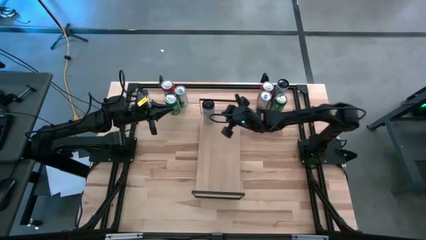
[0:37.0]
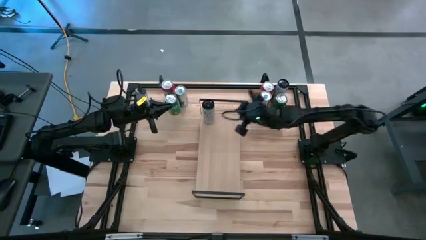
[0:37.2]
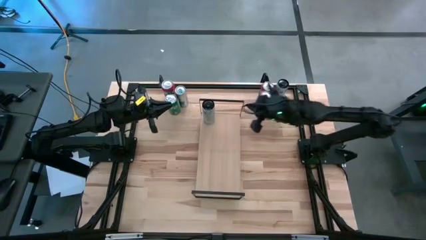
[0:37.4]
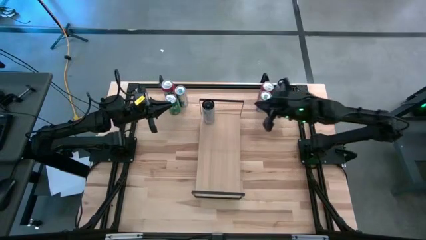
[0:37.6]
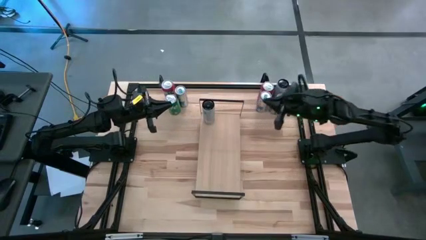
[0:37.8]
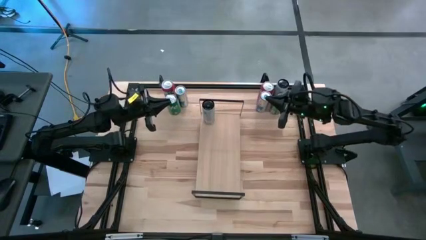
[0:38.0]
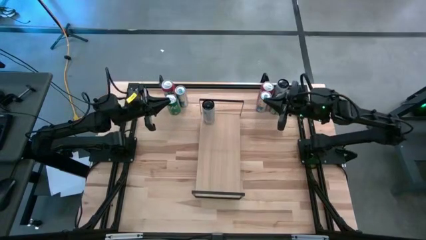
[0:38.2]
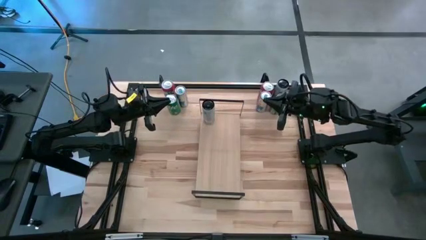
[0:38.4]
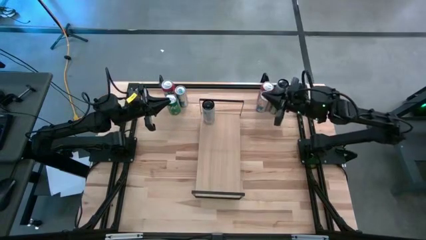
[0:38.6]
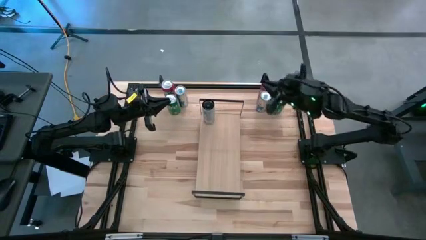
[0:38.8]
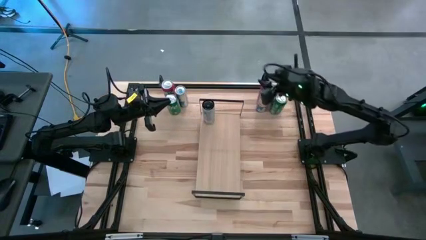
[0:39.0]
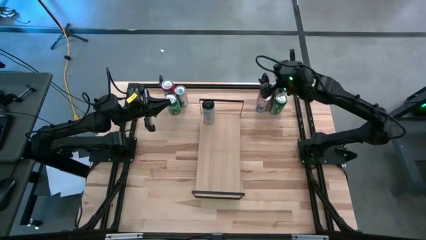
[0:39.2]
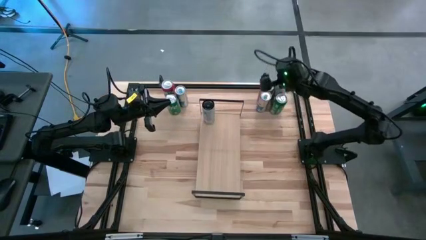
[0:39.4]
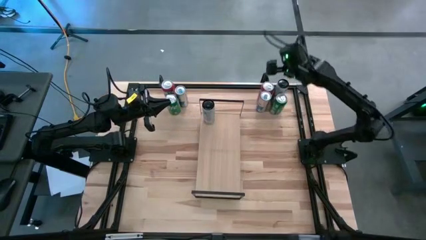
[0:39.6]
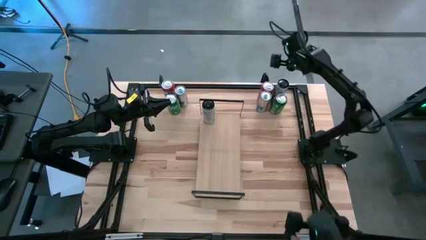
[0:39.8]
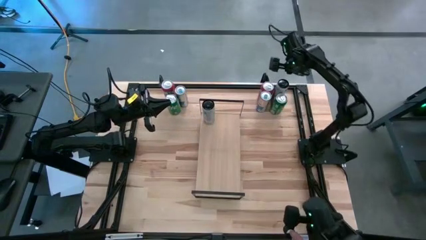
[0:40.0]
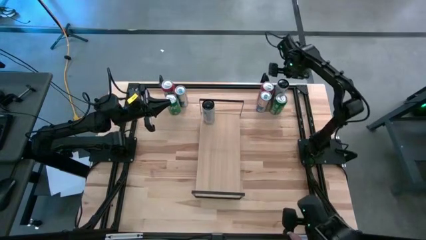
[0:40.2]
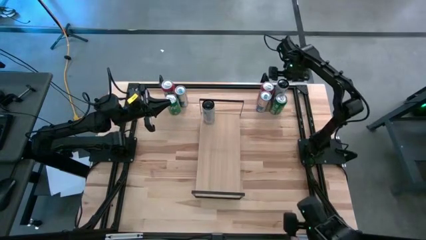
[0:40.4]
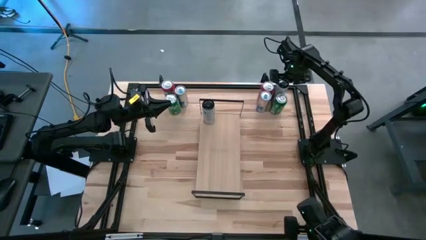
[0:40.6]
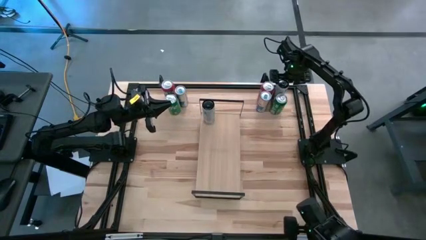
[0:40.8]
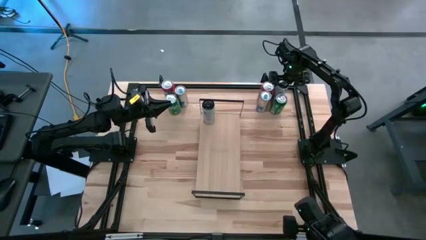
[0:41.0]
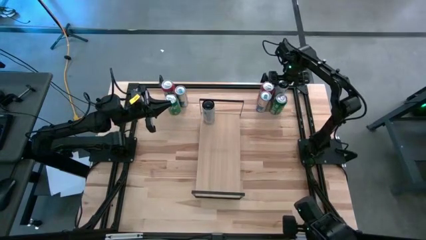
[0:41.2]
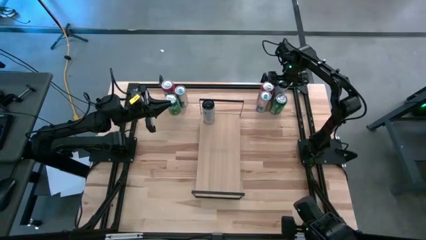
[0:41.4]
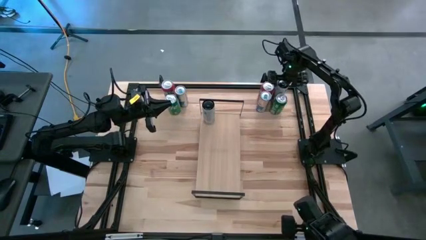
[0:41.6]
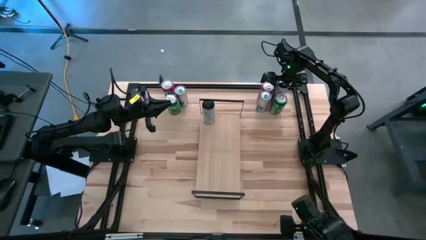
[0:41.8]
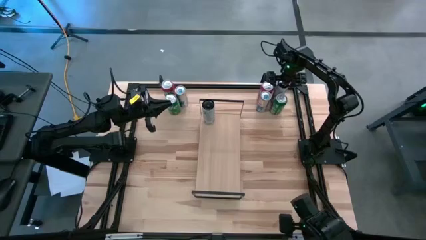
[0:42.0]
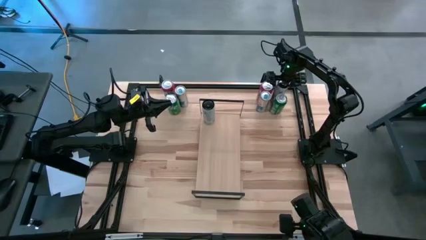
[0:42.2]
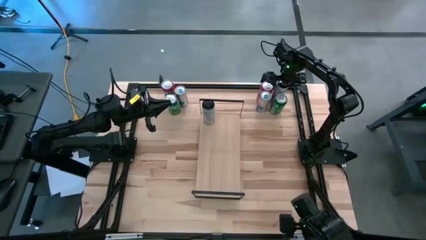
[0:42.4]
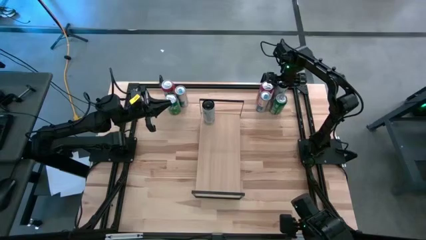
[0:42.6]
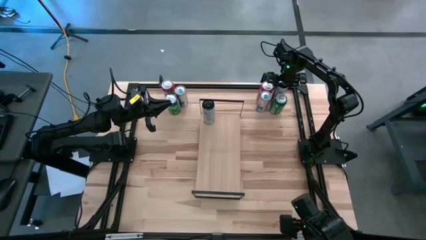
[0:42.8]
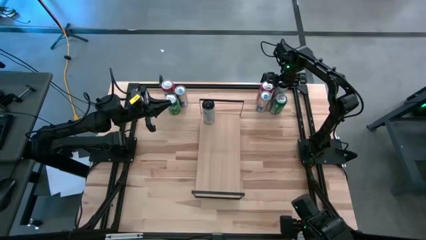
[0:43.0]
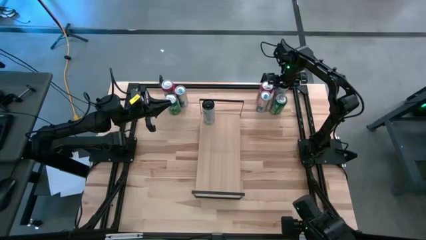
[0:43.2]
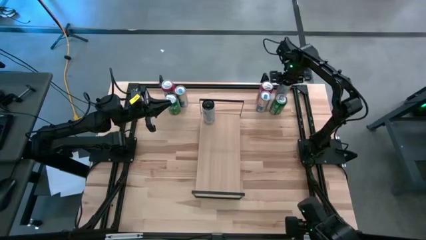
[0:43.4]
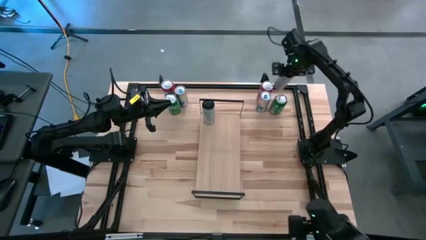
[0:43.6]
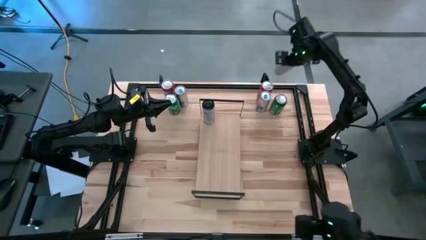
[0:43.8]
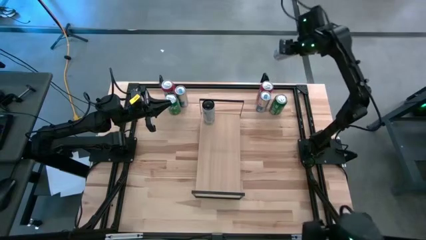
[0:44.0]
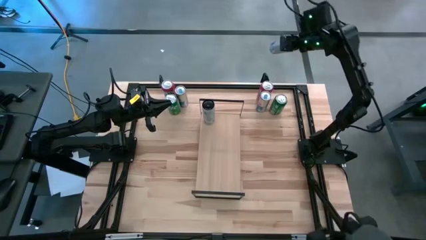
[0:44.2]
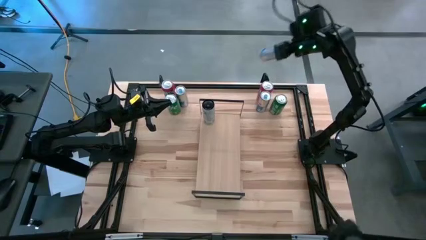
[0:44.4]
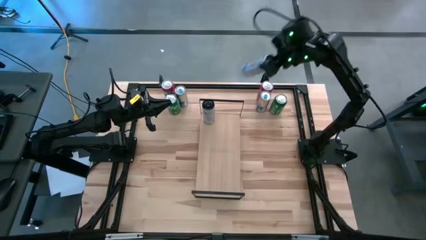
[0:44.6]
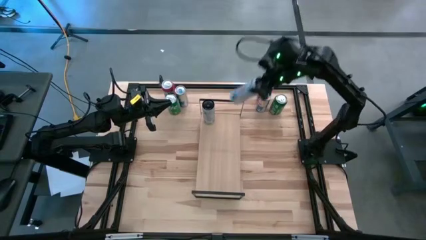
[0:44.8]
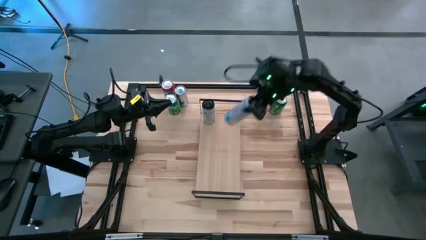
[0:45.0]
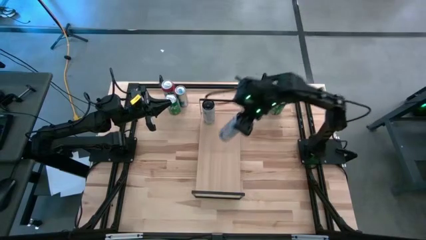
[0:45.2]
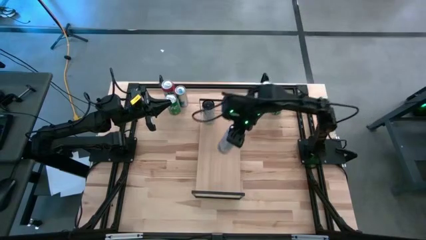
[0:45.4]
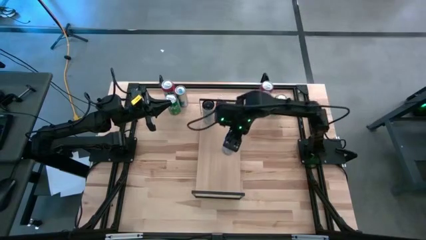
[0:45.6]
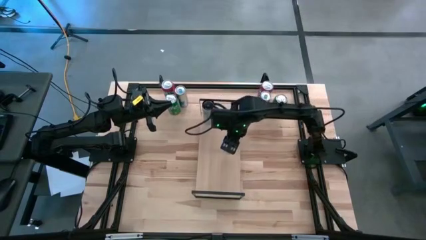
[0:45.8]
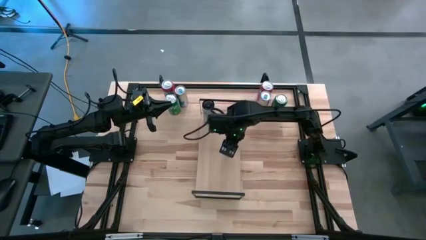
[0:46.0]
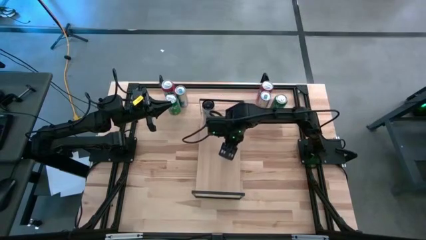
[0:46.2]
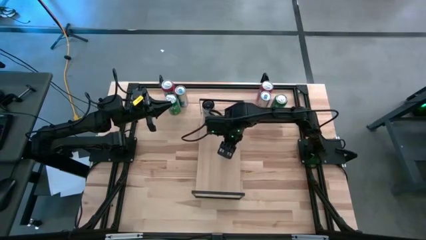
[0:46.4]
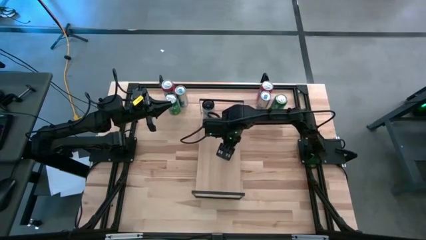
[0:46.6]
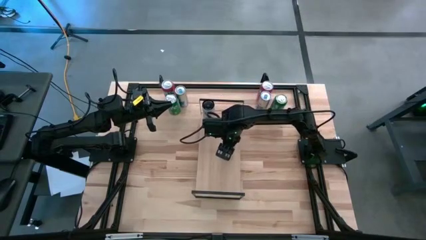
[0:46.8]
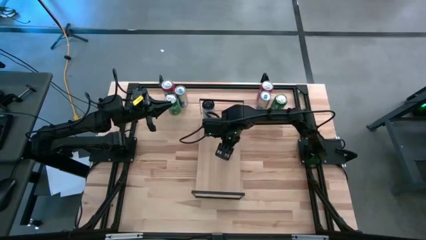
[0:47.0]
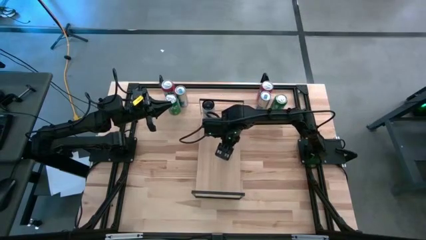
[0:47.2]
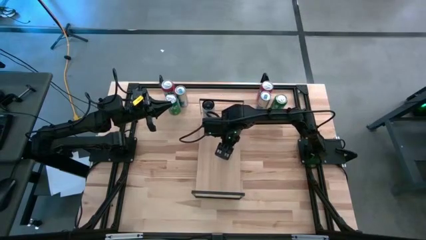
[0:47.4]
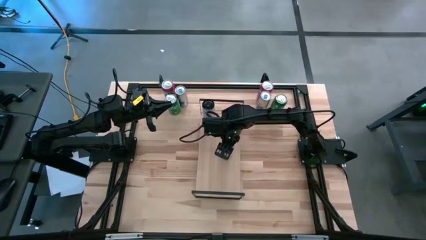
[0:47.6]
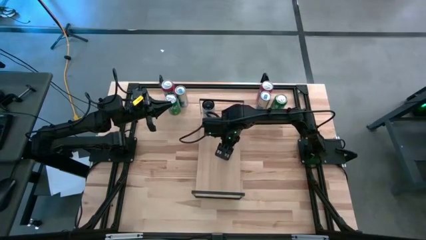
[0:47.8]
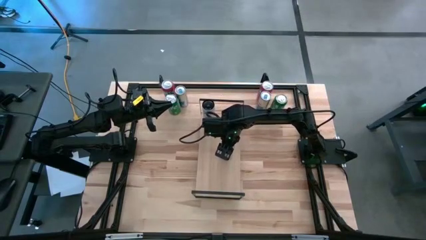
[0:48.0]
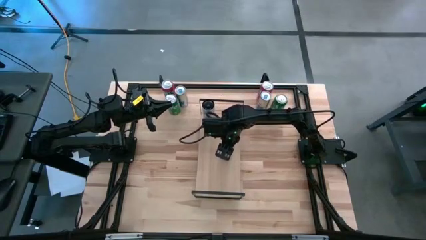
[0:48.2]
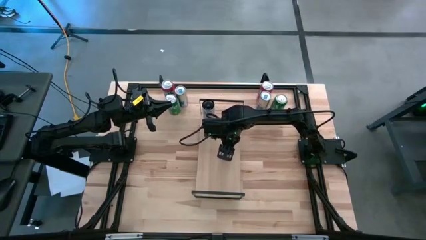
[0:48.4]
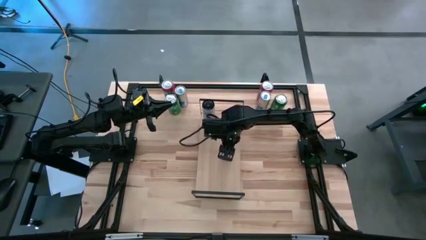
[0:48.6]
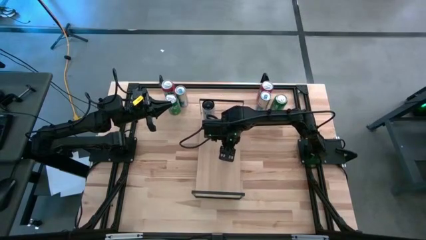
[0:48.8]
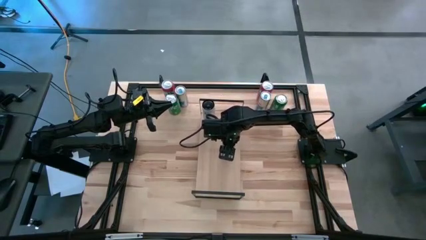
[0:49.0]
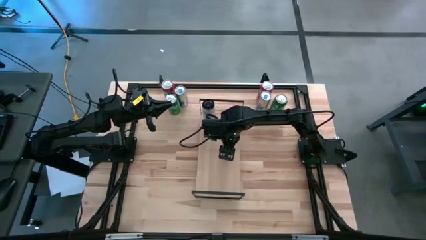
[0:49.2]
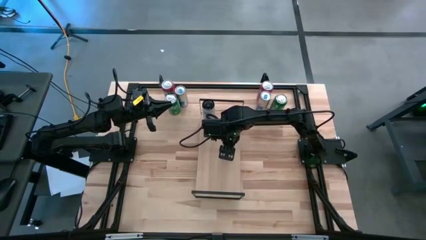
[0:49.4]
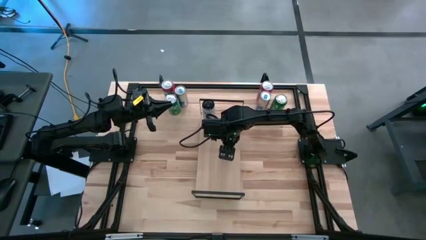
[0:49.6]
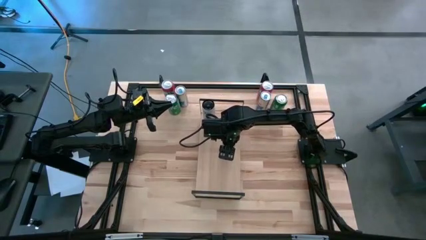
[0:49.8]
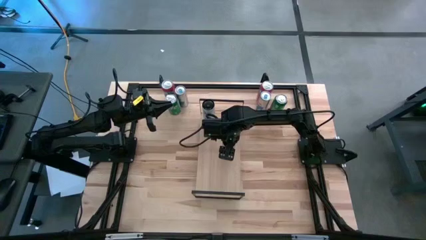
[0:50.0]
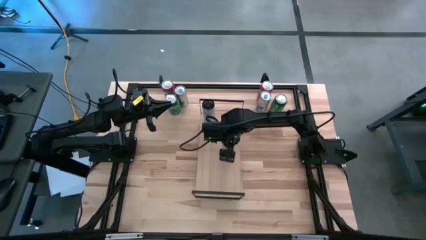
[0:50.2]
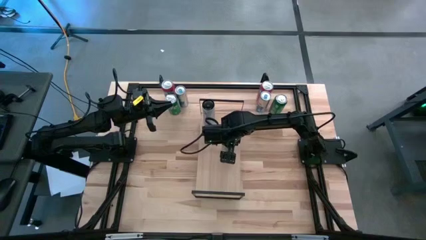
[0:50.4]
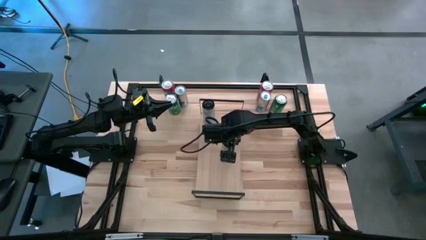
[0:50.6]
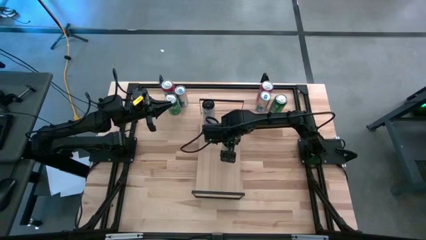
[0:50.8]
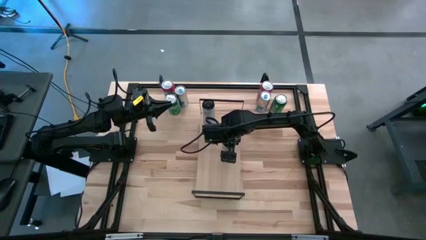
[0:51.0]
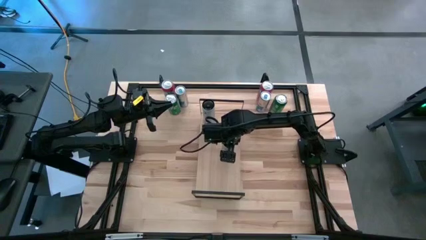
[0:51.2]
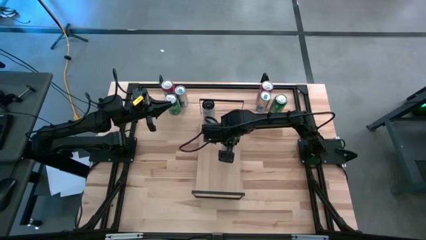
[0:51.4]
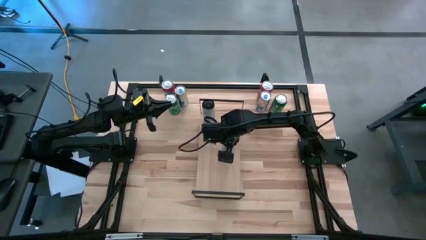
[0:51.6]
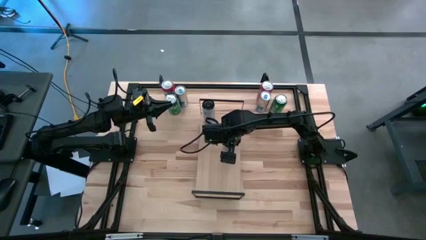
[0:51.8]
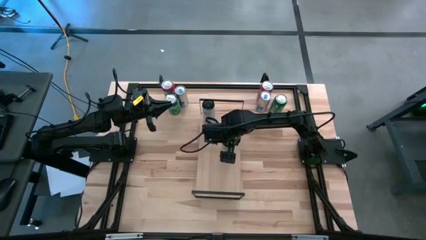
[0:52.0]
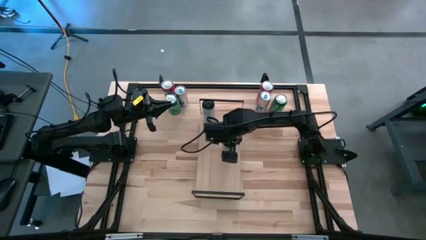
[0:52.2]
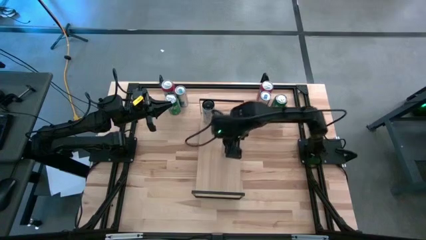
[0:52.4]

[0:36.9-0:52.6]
Task: Place canned beverage on shelf
Put the left white-pink soda can, aligned with the other white-pink soda can on the shelf
